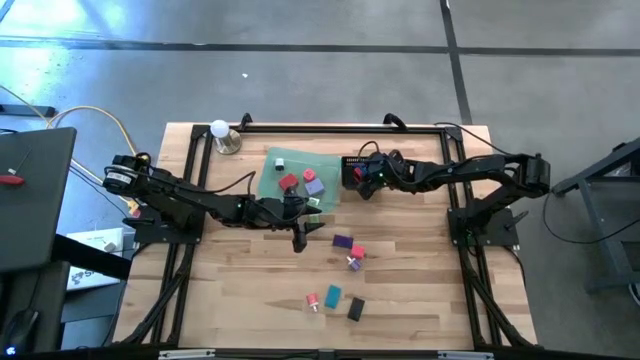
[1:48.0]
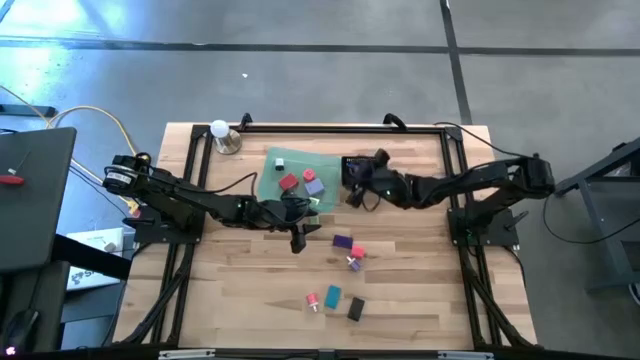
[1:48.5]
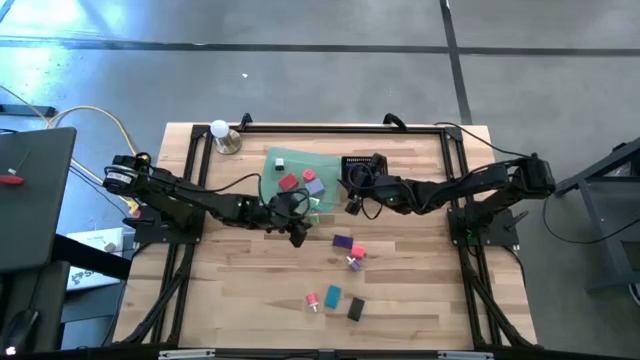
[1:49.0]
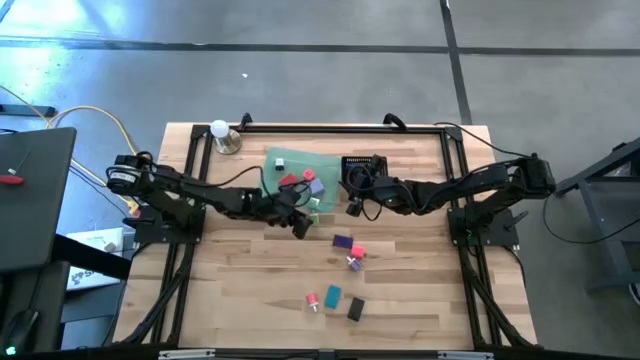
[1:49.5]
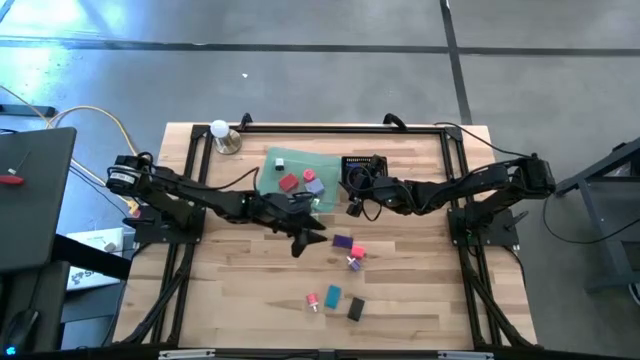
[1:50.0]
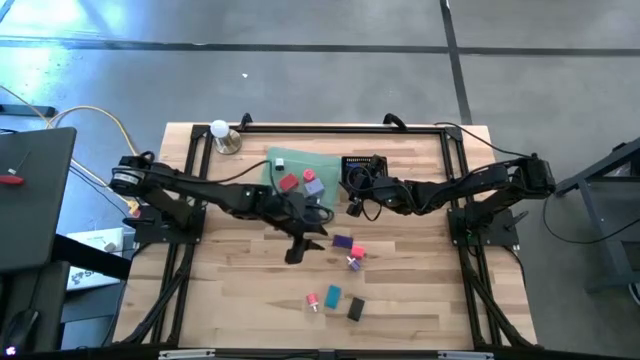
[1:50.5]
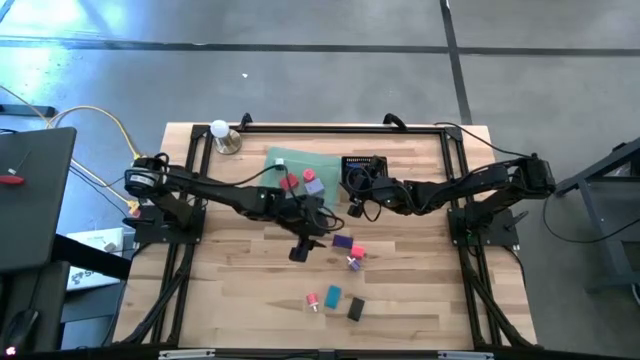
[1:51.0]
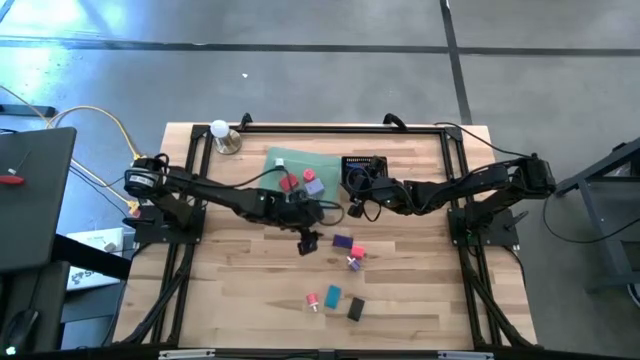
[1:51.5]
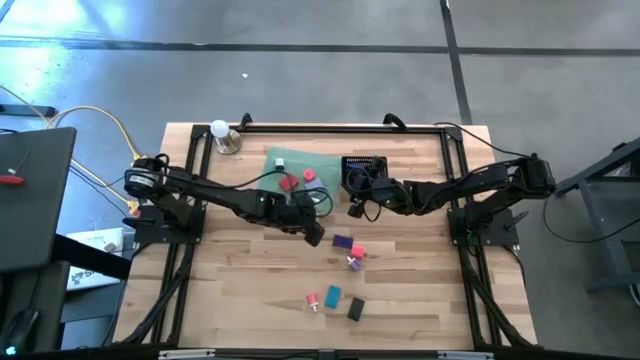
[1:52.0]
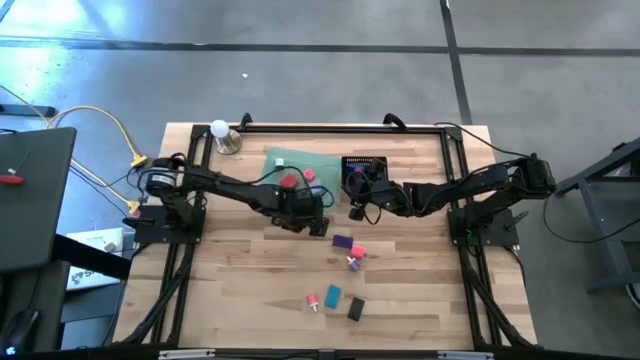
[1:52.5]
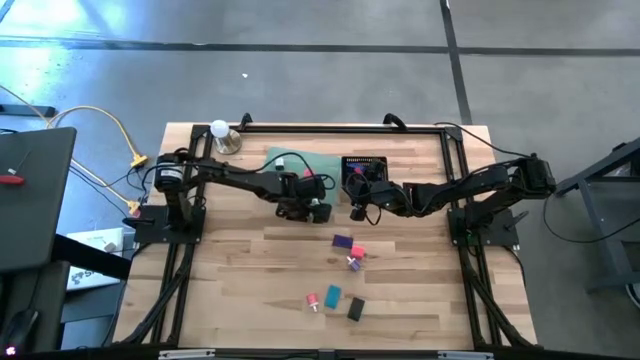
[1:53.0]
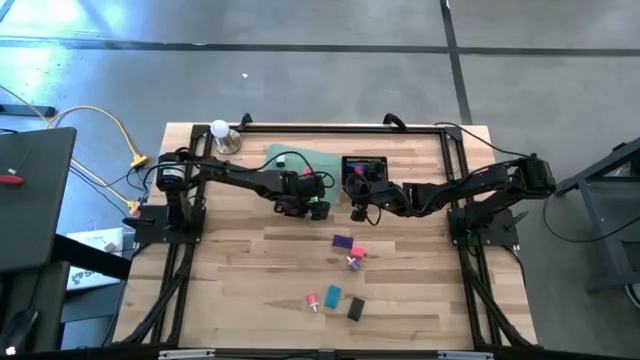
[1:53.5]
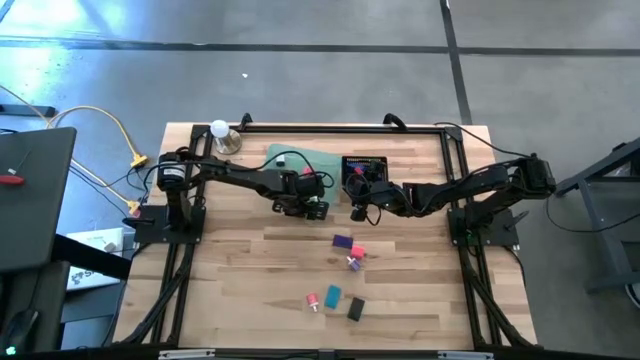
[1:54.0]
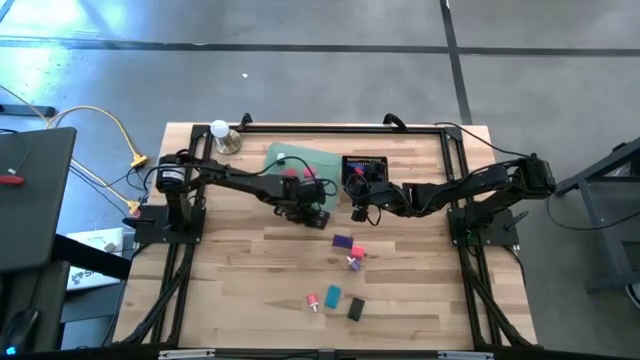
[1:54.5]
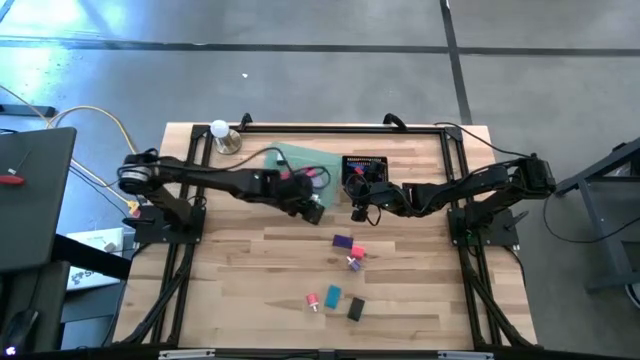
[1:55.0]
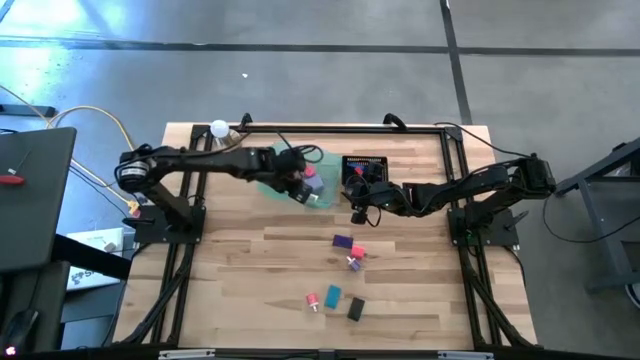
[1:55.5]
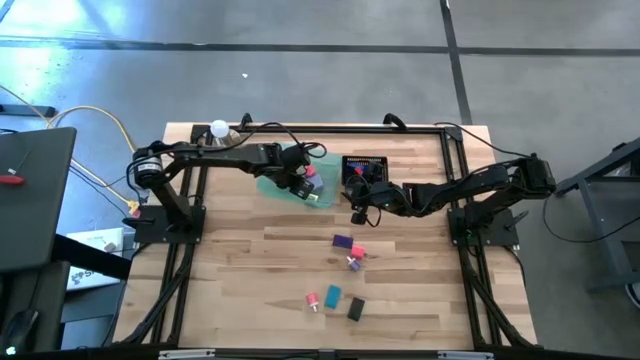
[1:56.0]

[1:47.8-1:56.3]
Task: Pick & Place Office items
Put the green charger adapter into the green bin

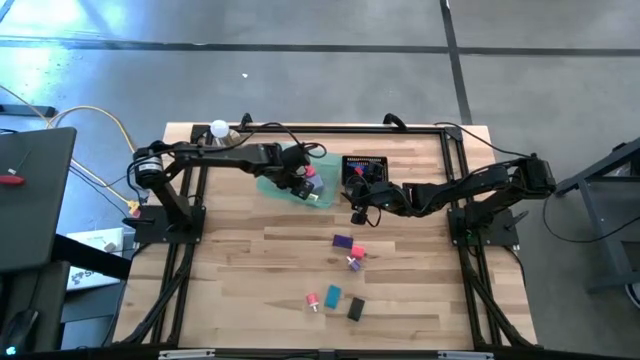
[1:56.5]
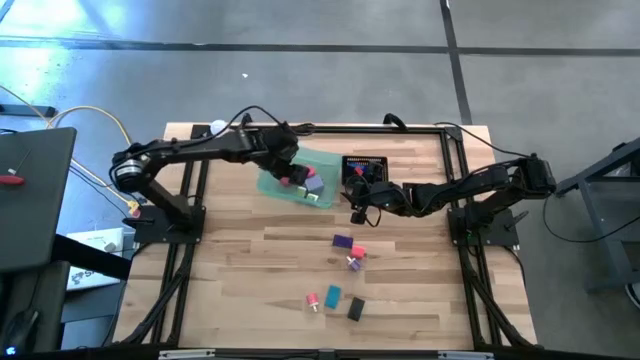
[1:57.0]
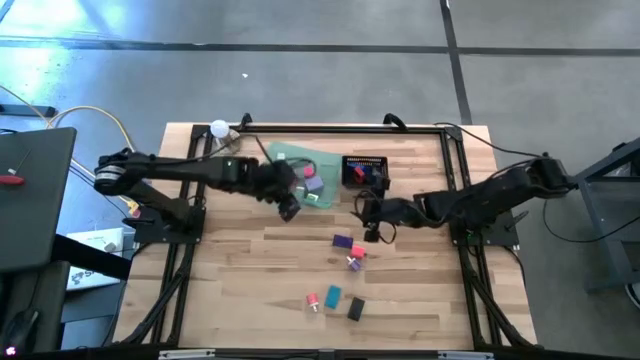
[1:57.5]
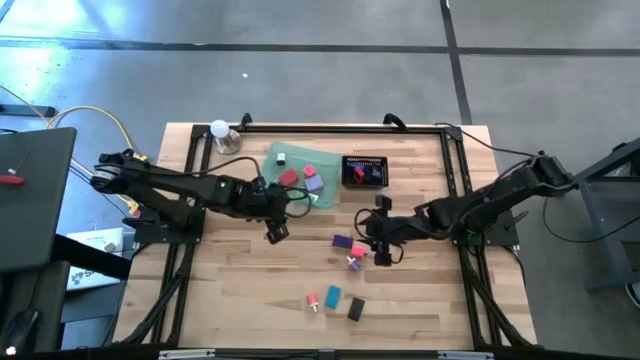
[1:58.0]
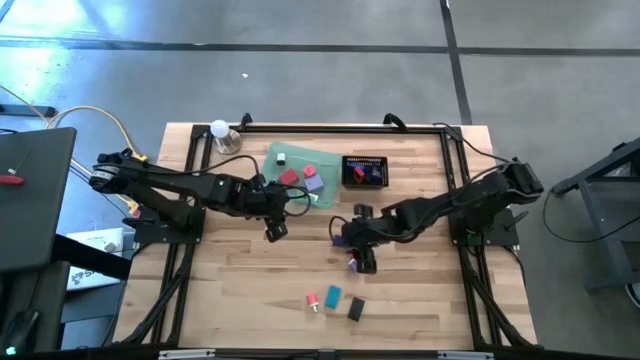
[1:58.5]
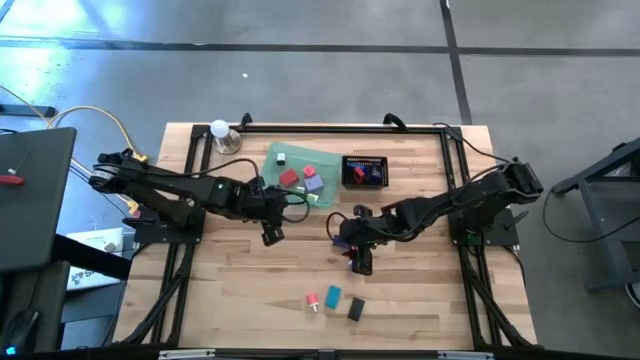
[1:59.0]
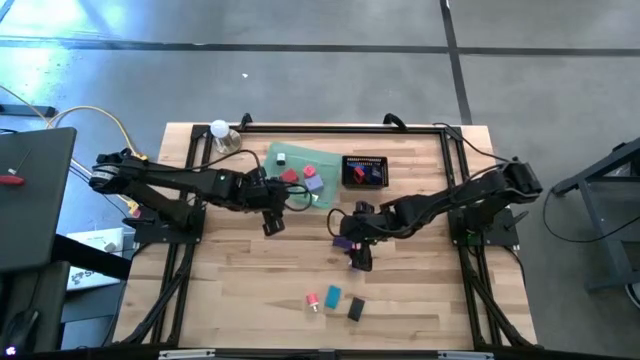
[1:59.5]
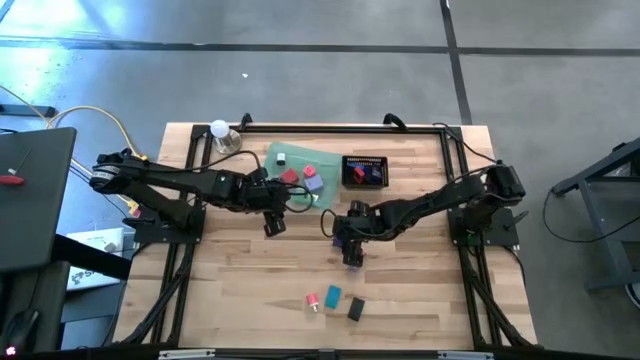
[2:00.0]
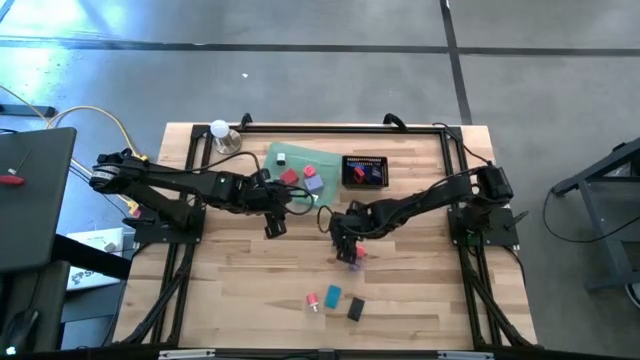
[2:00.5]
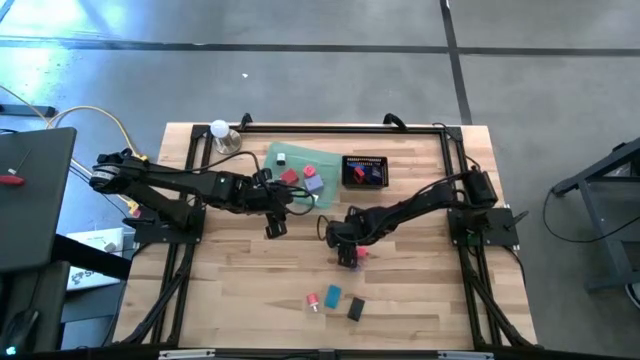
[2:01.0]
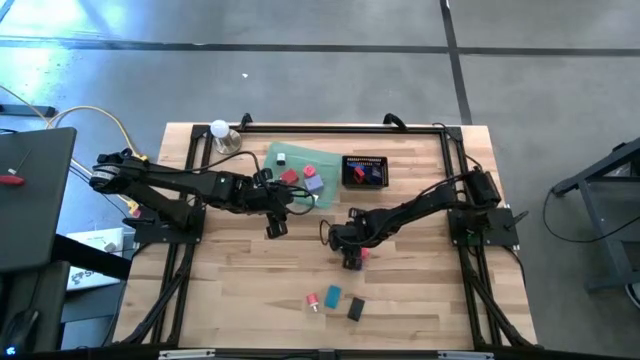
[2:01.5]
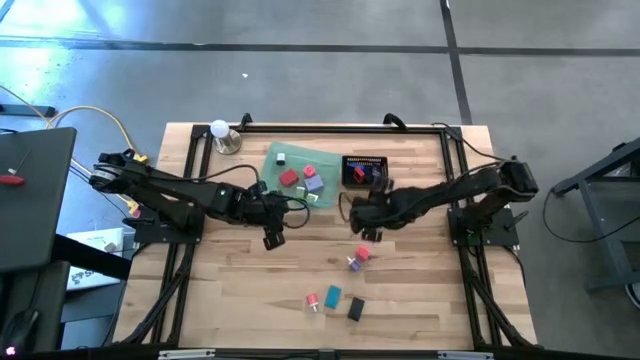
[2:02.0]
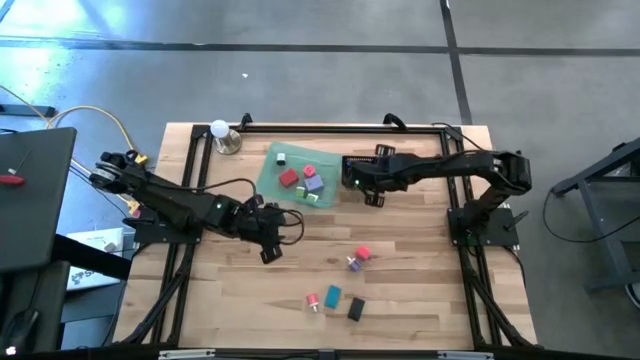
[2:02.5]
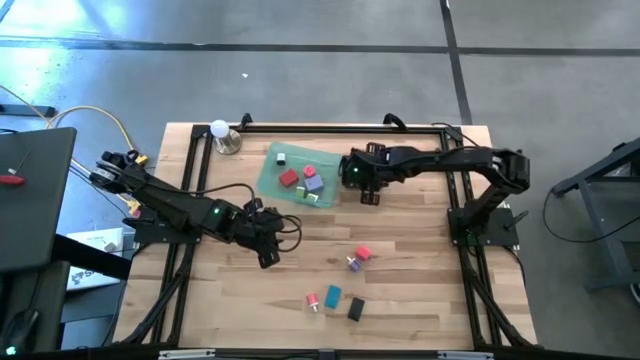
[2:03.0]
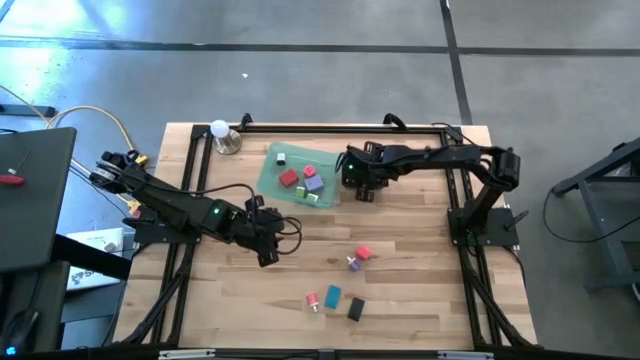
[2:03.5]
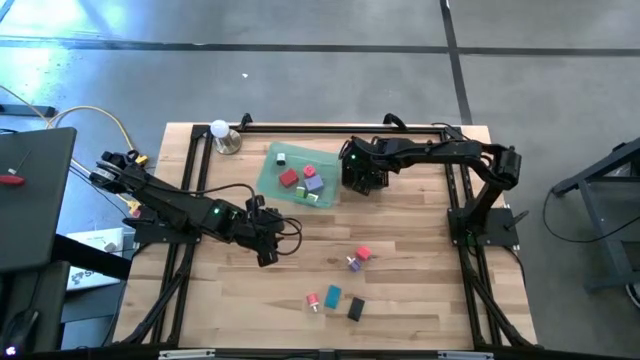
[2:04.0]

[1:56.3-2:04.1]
Put the dark blue digital timer into the black bin

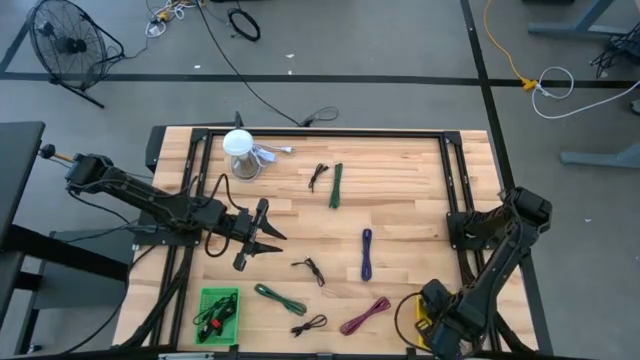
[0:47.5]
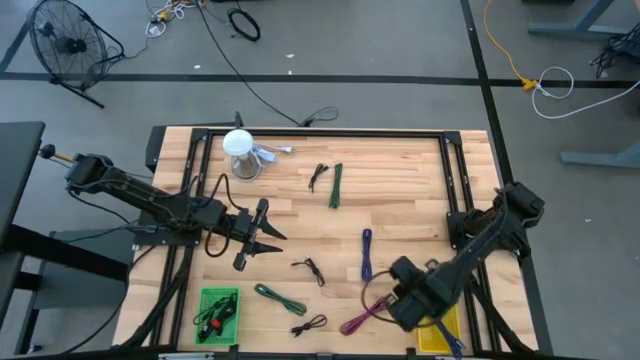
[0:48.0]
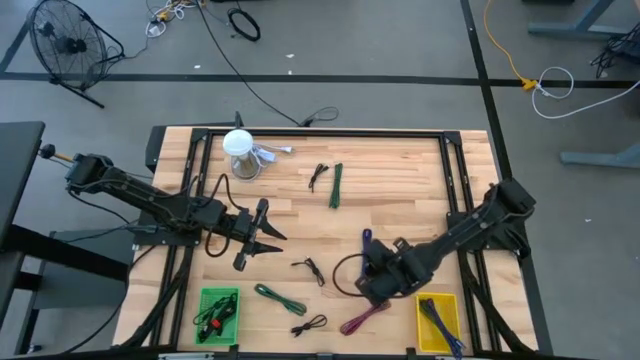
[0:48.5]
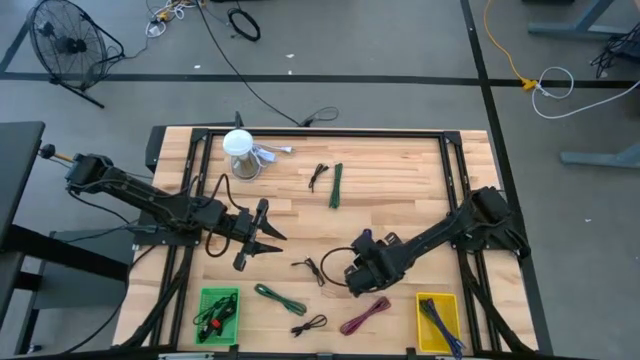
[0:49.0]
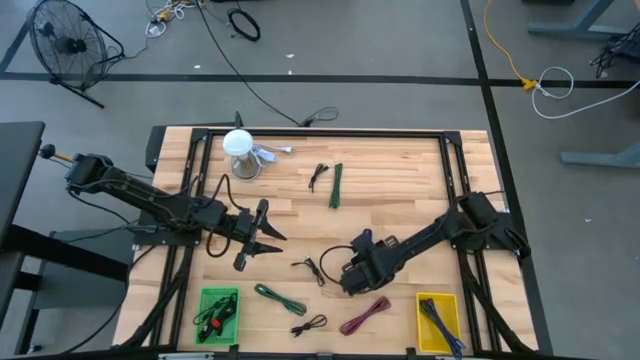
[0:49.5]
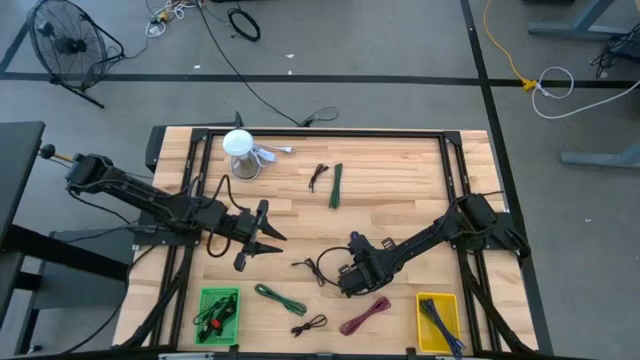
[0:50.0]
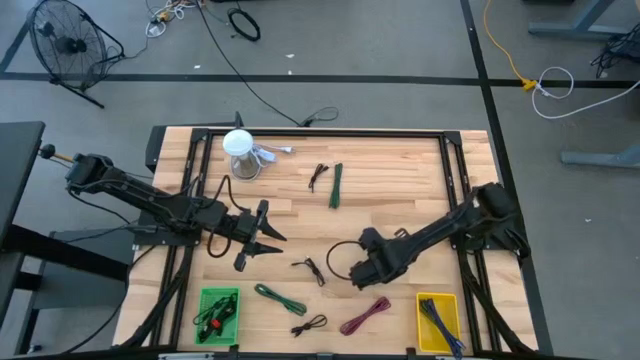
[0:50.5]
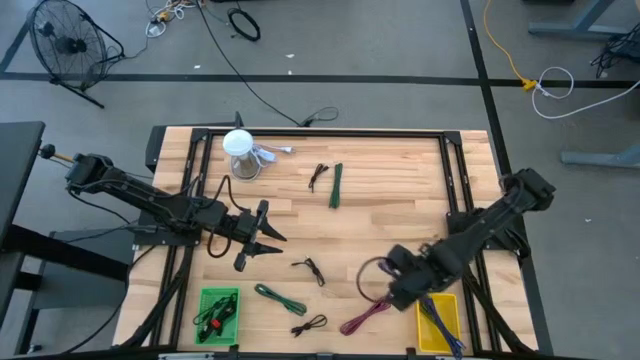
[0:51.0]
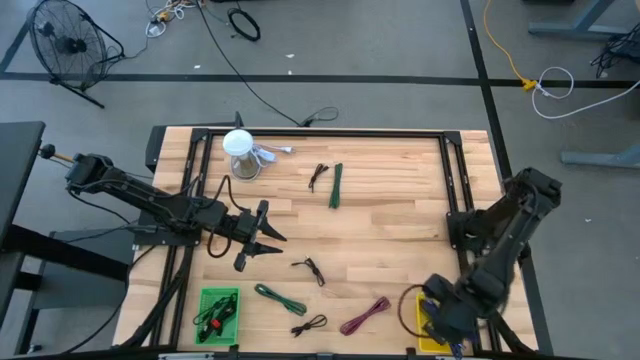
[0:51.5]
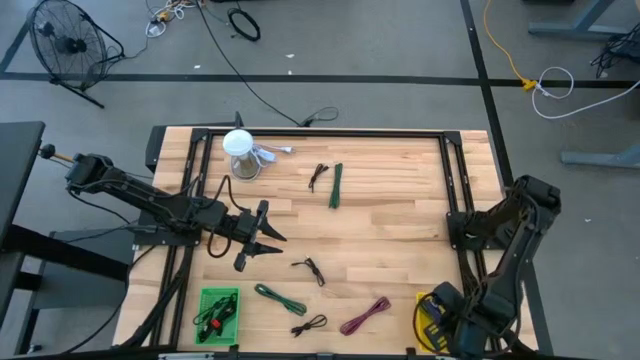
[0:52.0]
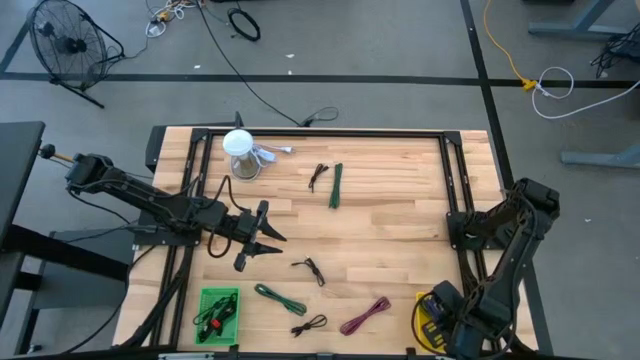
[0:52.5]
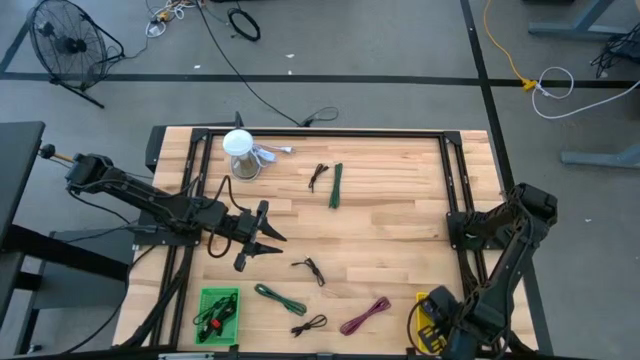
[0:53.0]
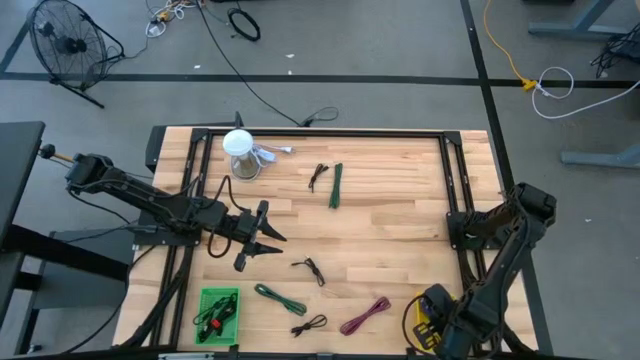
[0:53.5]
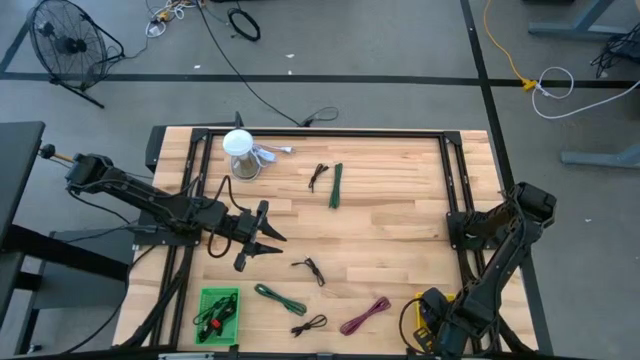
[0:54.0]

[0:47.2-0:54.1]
Task: Pick & Place USB Port
Put the black violet charger cable into the yellow bin
